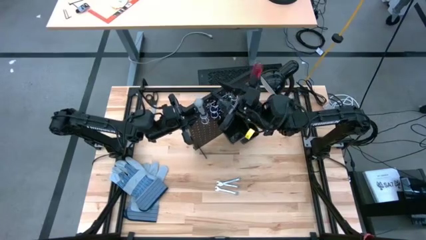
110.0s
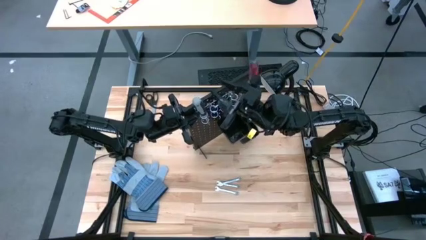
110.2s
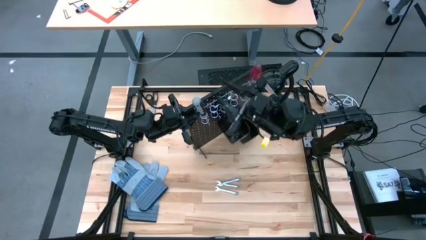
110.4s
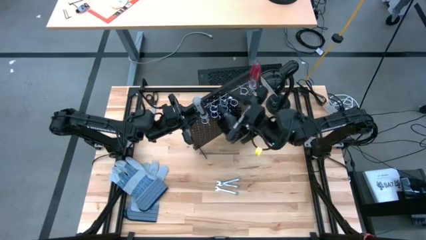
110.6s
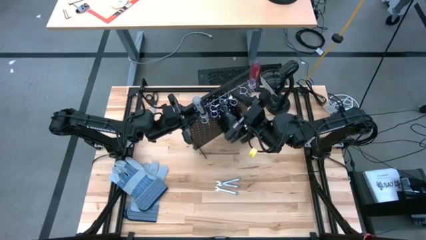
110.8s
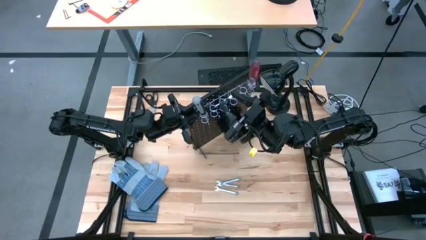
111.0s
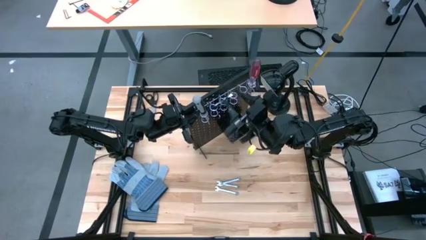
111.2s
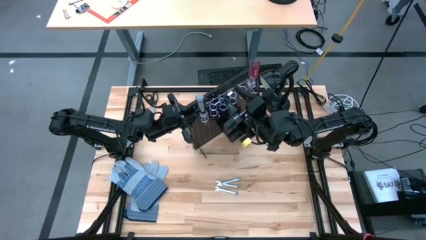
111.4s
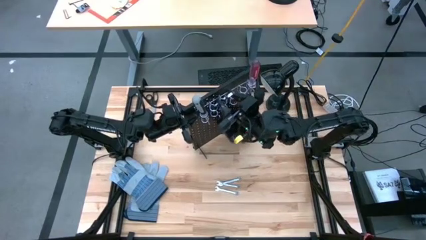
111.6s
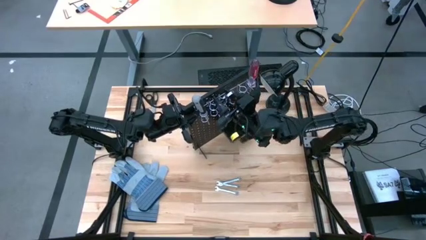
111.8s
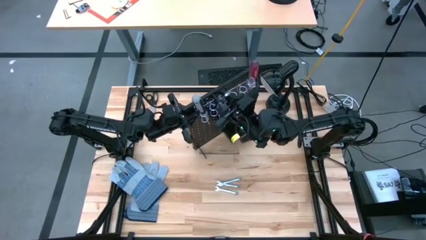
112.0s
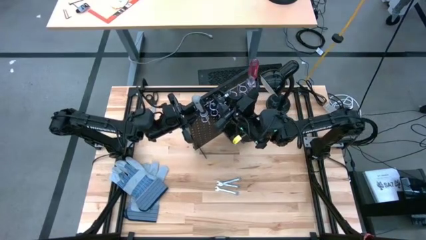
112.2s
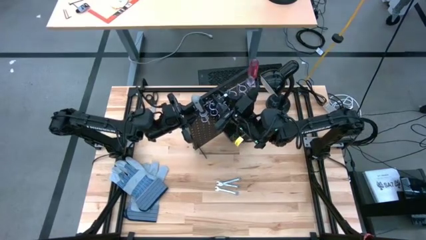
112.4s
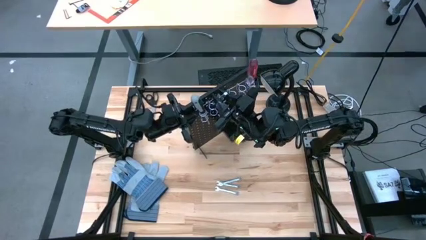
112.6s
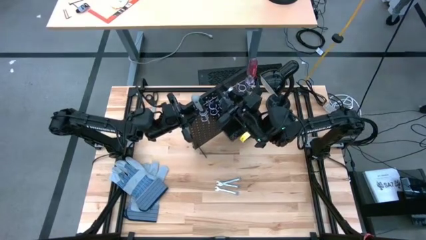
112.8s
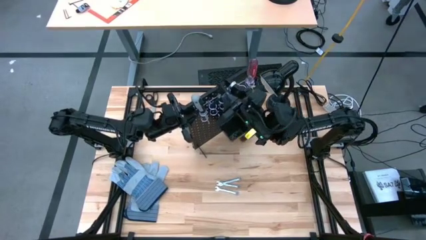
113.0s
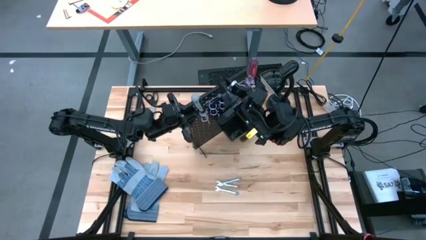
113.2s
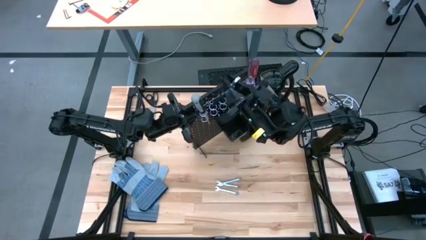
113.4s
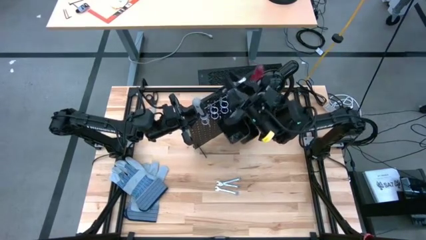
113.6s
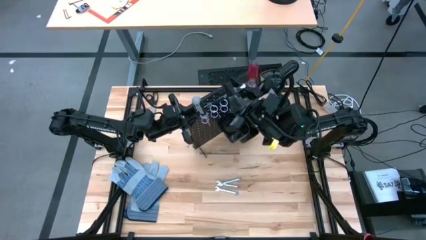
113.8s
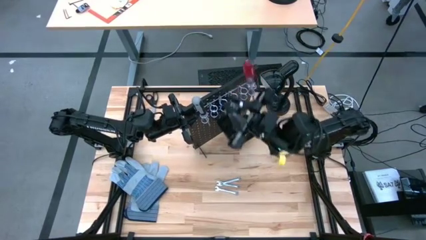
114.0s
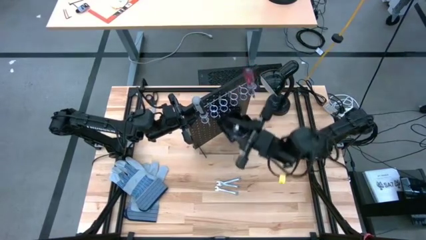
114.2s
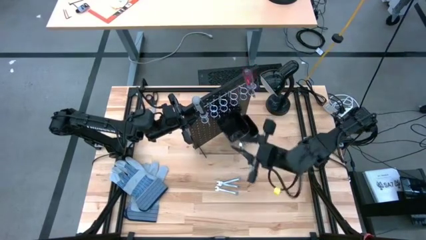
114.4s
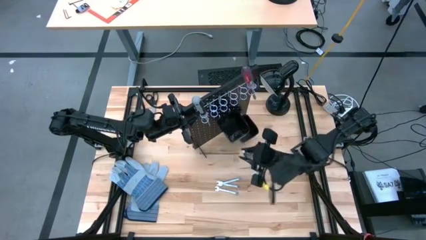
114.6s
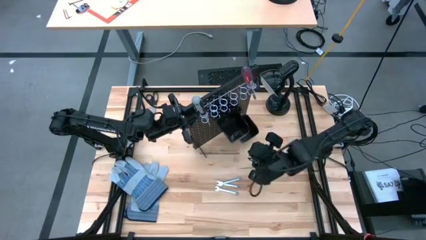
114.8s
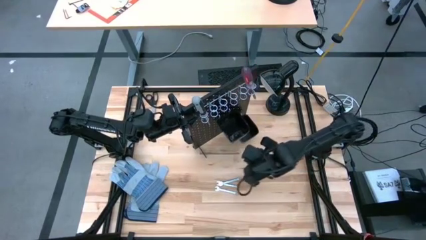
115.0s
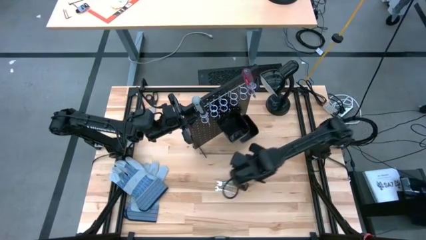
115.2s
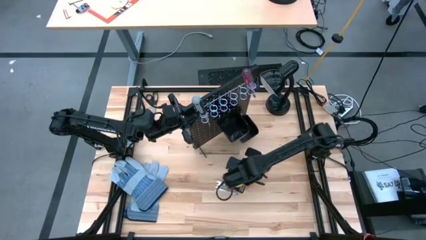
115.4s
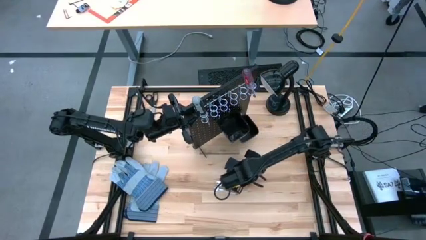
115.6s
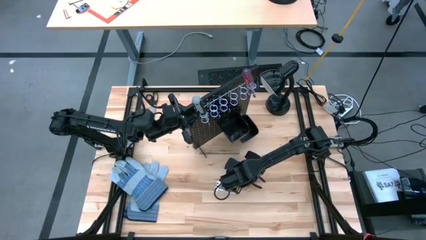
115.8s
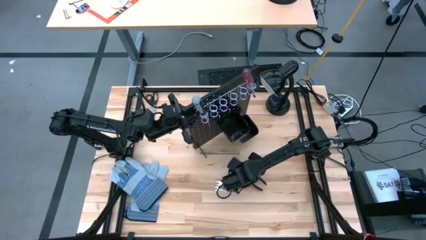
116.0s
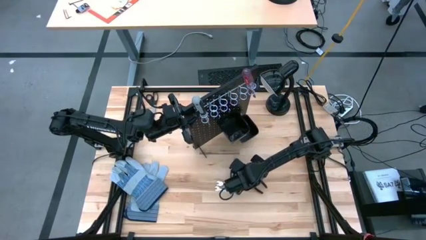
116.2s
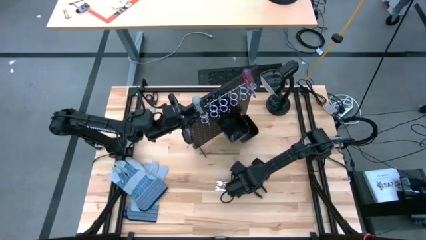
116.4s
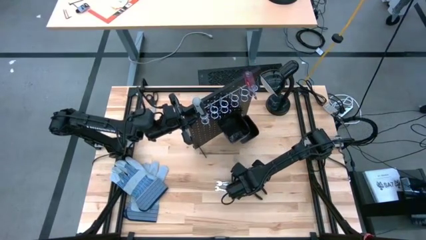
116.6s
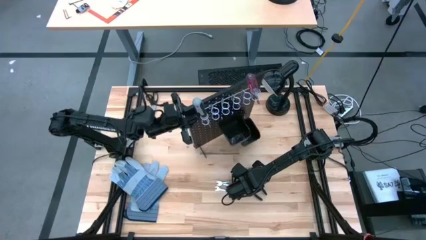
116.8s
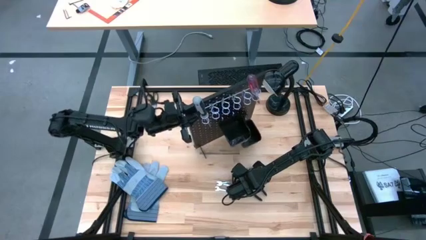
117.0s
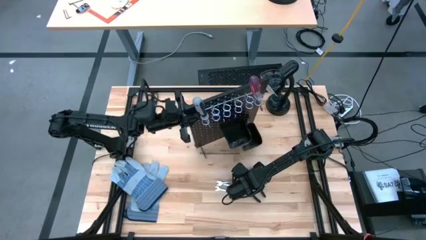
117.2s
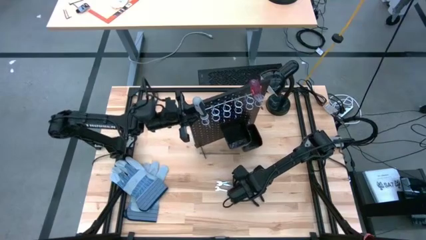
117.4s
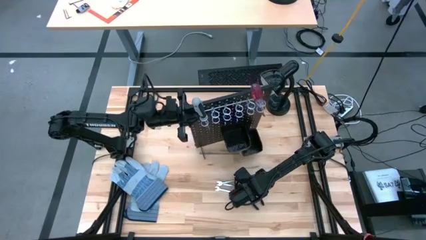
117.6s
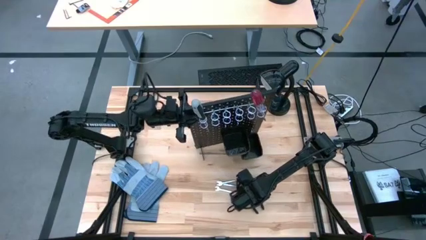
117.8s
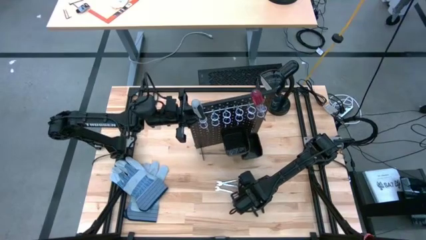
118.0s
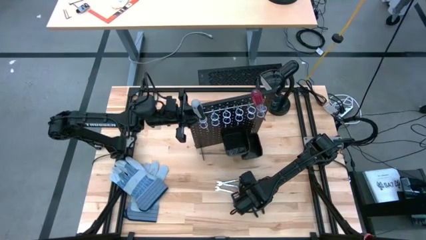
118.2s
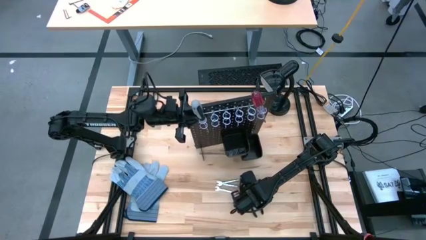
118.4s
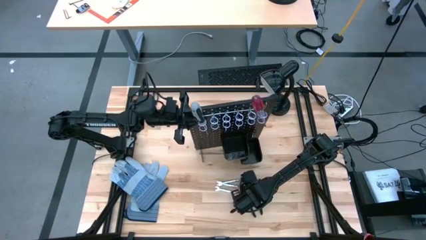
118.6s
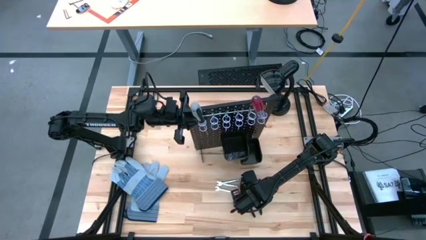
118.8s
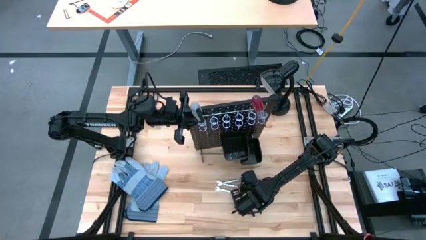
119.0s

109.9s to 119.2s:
Task: Hang tools onto peg board
Unhang the black pliers from the black peg board
